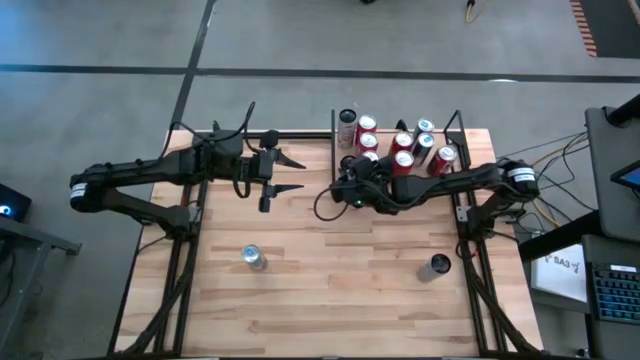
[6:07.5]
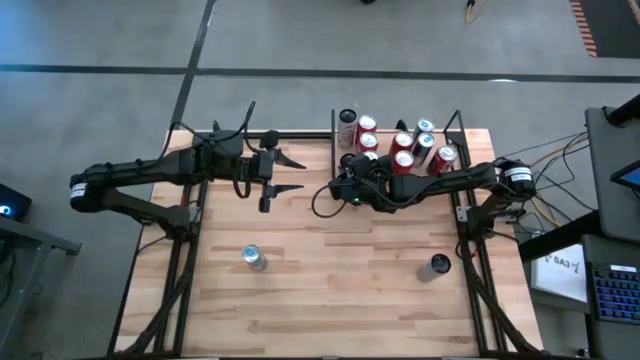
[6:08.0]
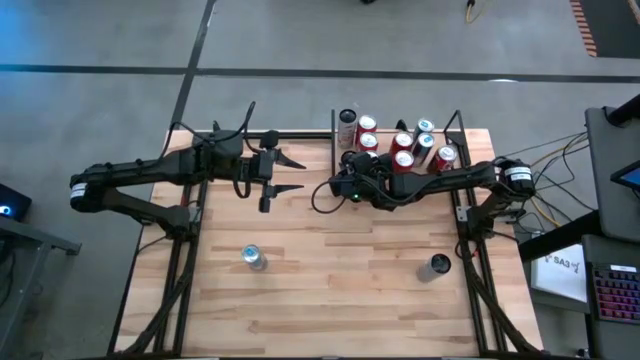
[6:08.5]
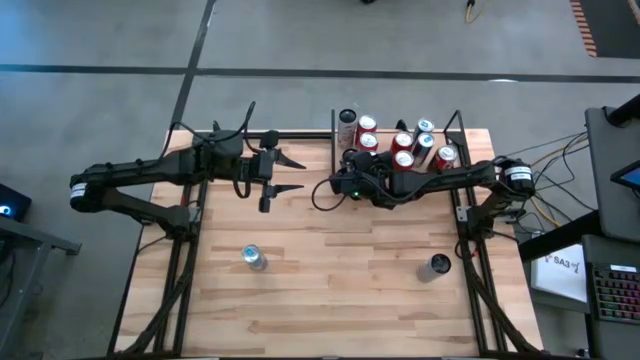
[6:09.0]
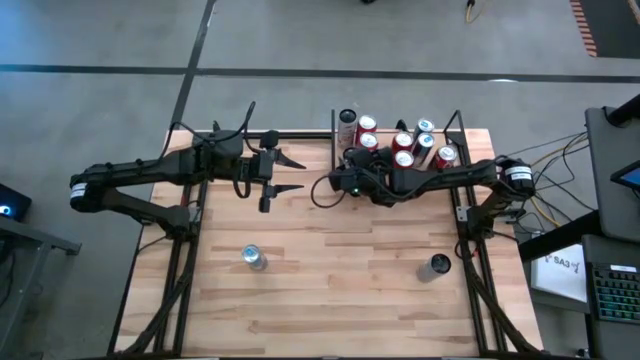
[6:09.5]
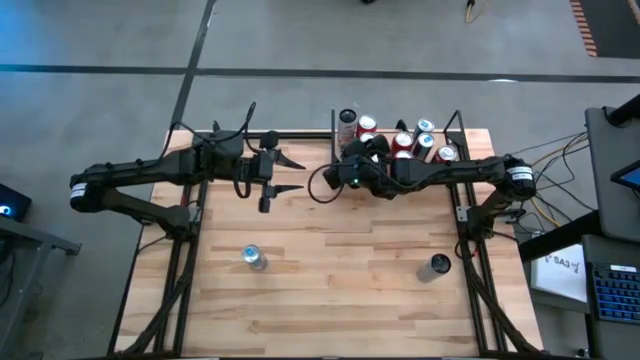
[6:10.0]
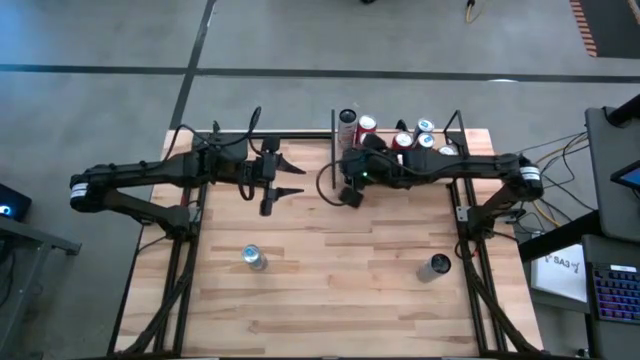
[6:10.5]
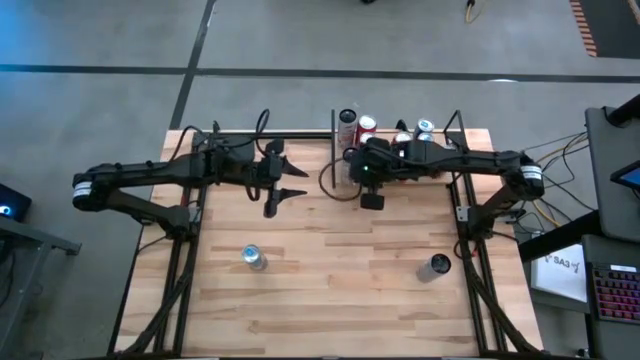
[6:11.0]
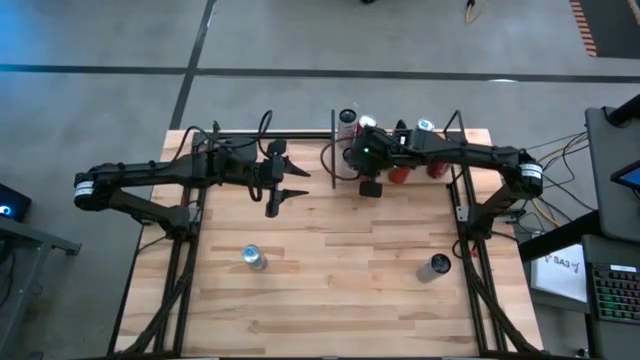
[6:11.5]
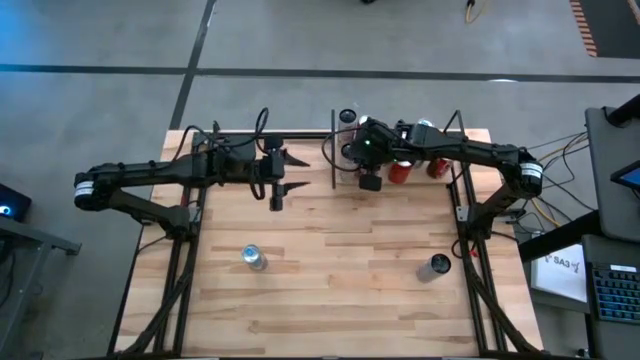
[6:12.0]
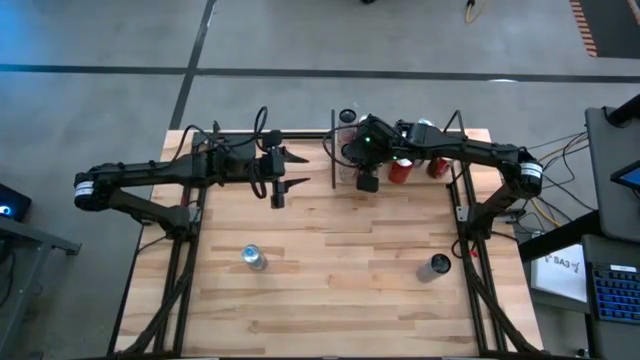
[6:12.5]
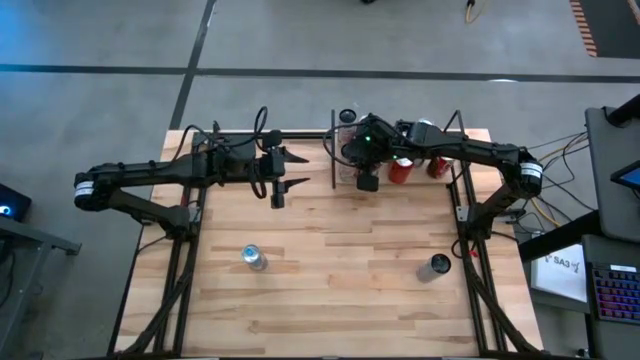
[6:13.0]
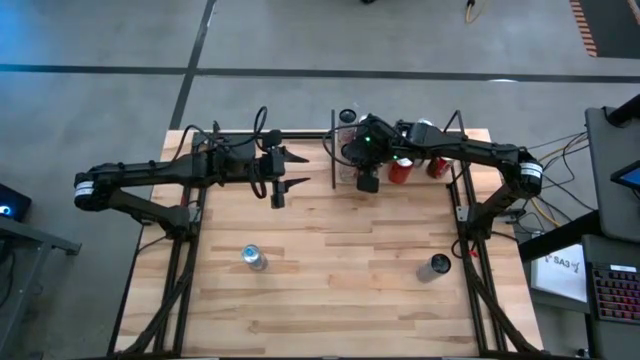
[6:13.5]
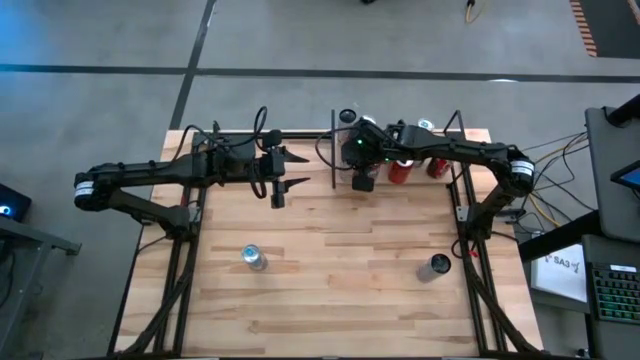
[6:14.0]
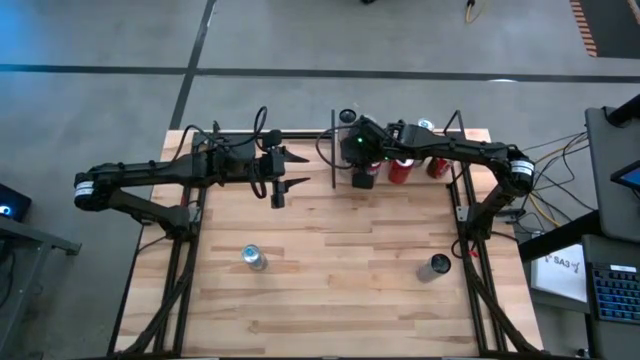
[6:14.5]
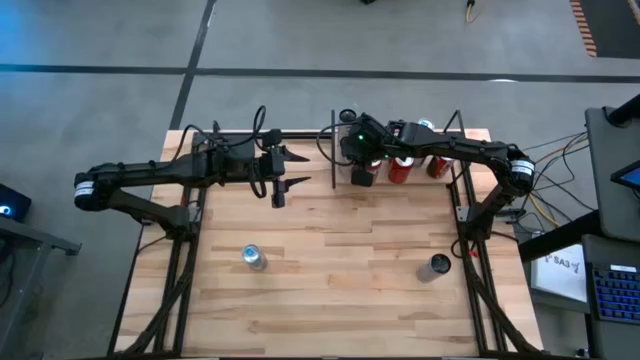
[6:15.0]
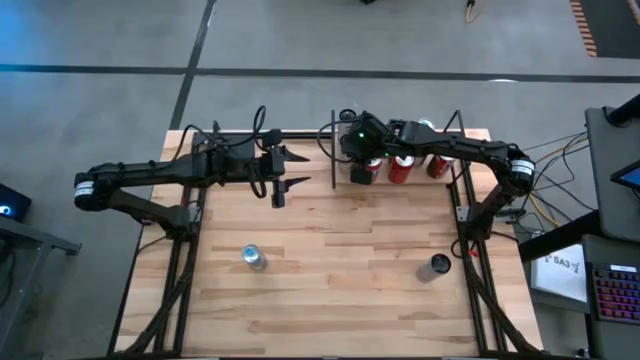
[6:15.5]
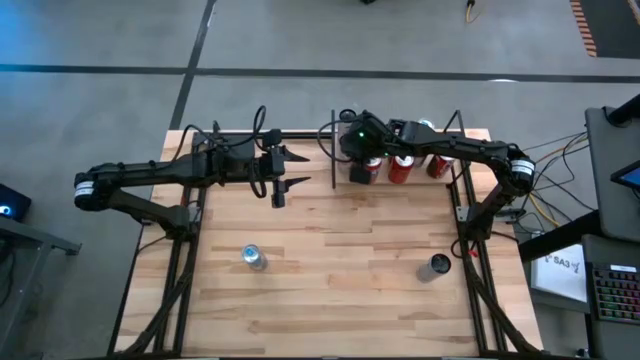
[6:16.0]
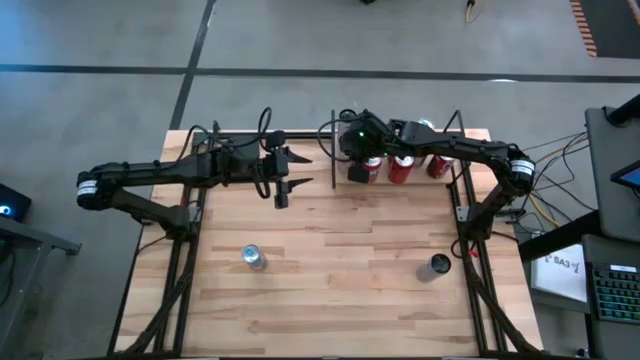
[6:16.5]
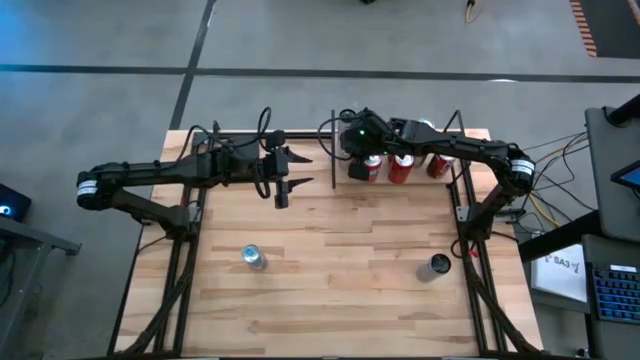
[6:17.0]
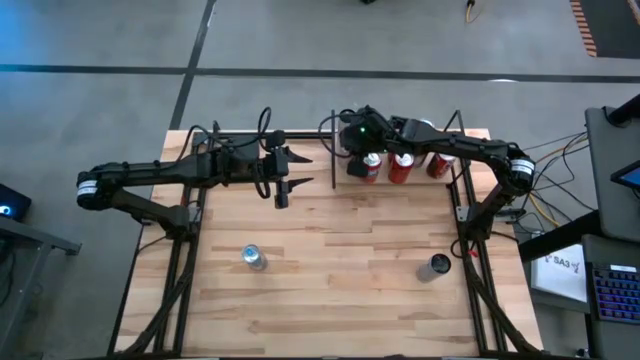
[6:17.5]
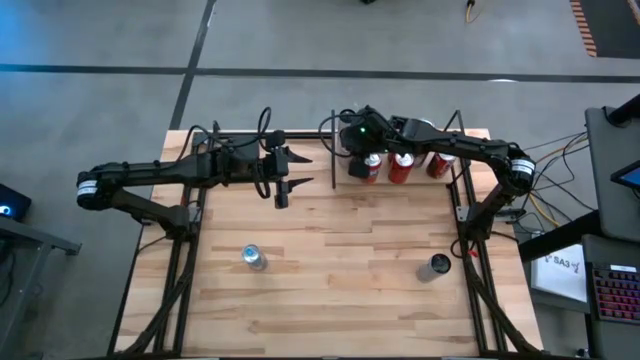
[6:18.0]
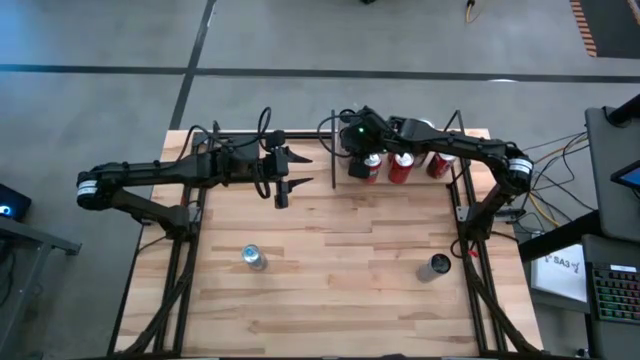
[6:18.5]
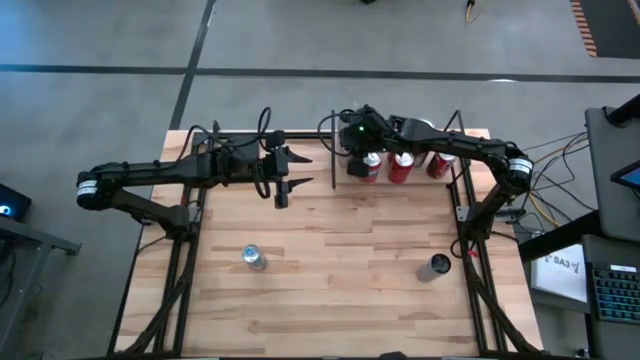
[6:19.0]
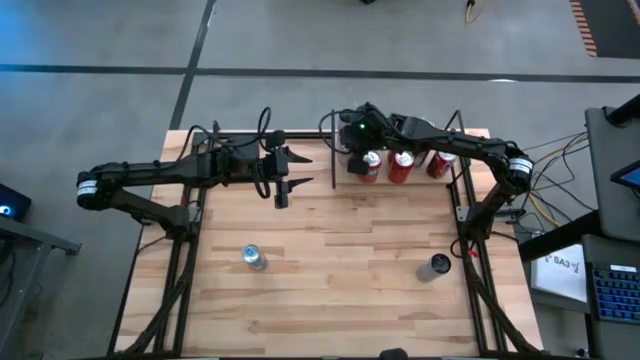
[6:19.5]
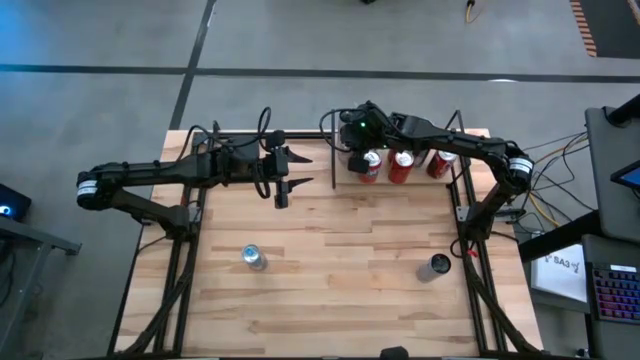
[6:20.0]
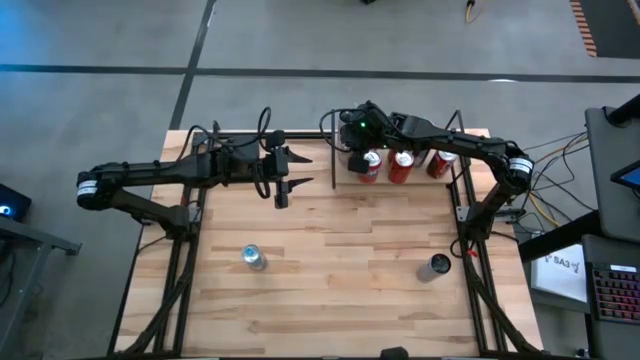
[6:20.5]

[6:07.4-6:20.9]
Task: Place canned beverage on shelf
Put the left white soda can on the shelf aligned with the other white soda can

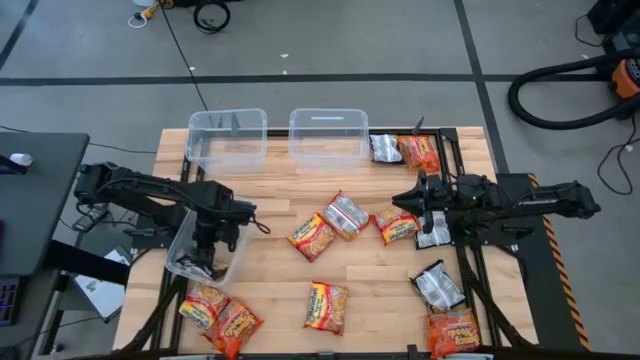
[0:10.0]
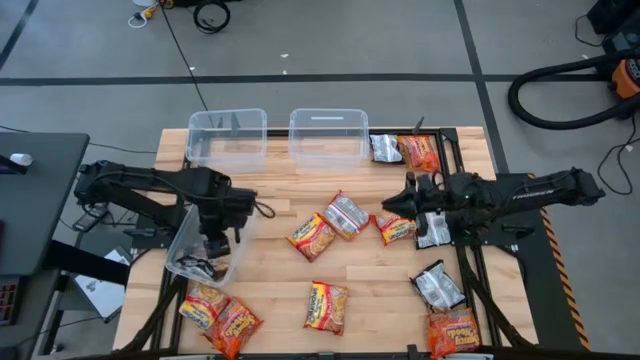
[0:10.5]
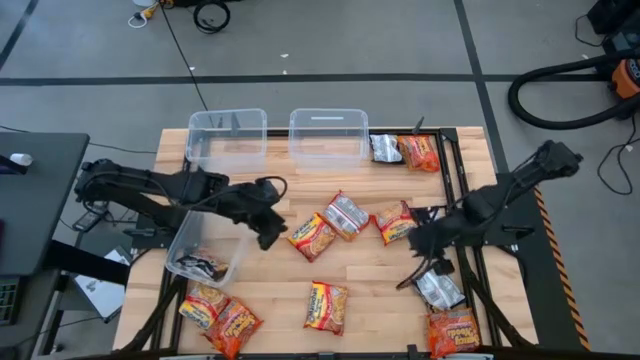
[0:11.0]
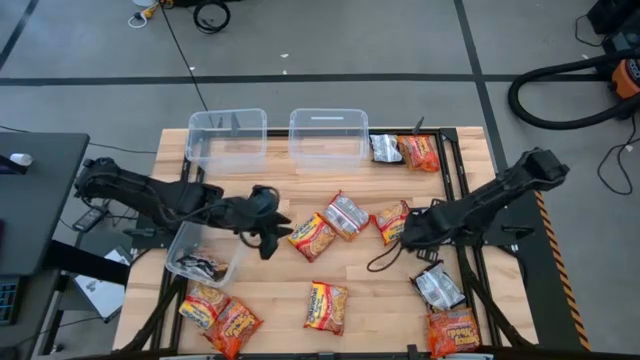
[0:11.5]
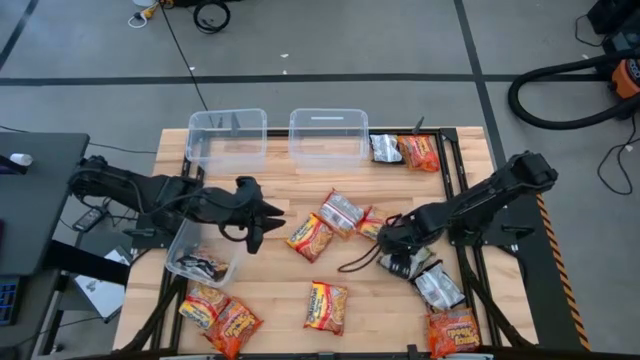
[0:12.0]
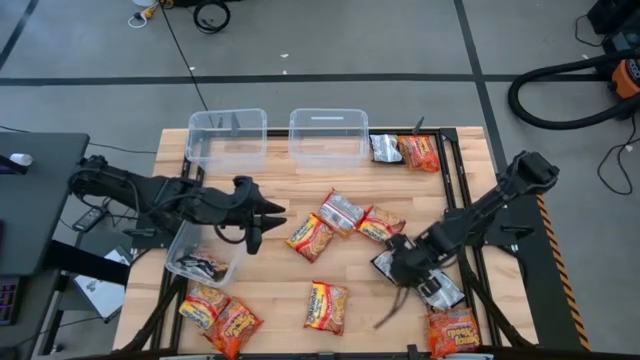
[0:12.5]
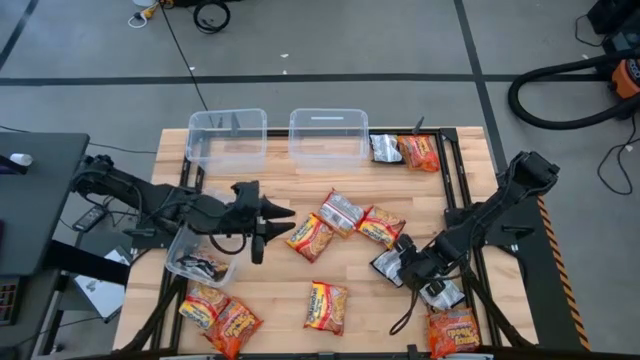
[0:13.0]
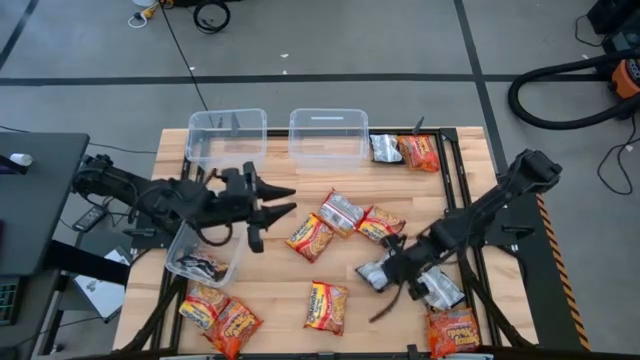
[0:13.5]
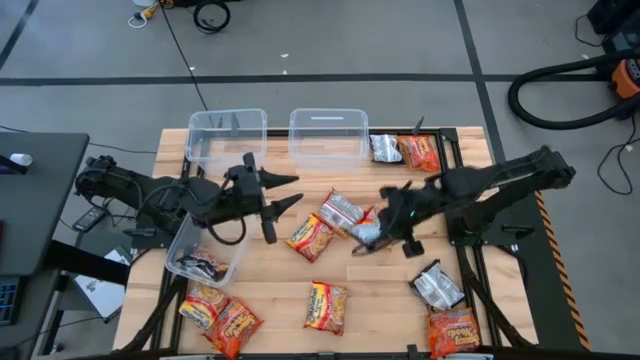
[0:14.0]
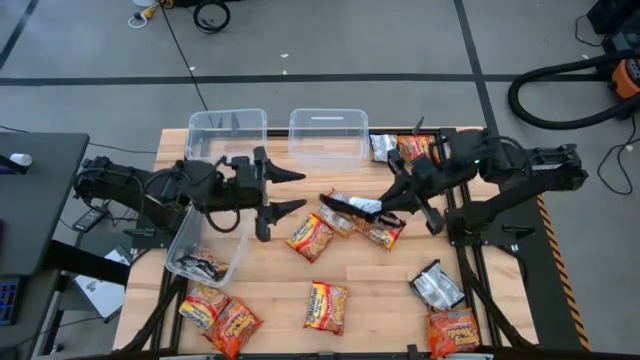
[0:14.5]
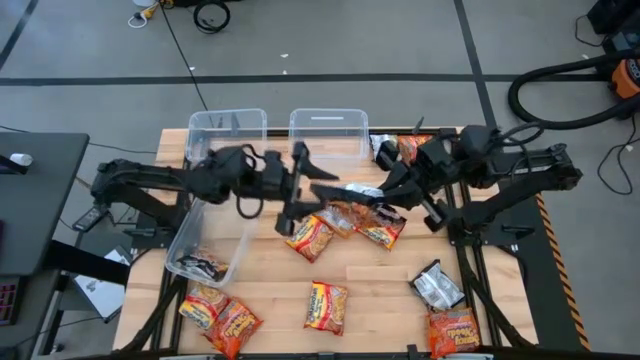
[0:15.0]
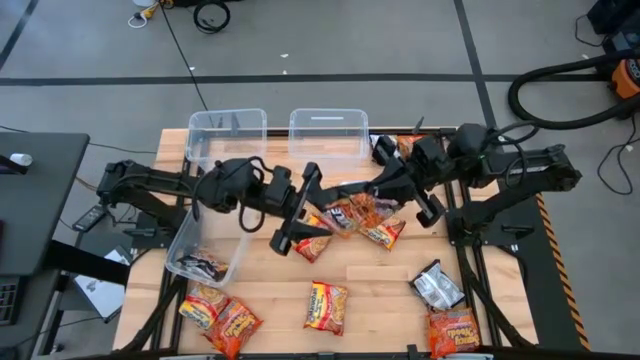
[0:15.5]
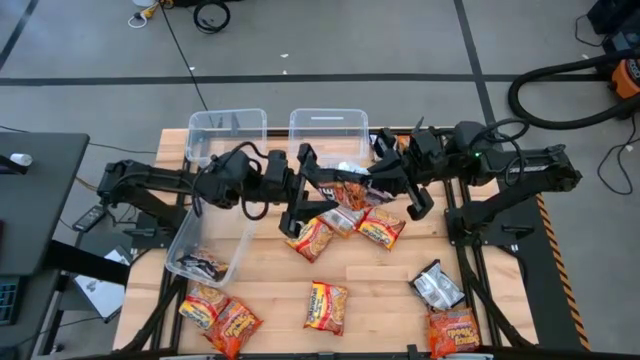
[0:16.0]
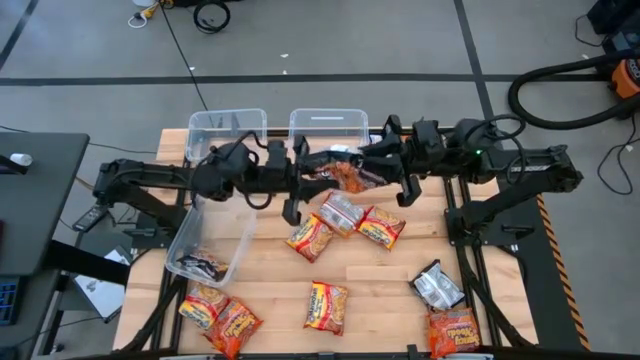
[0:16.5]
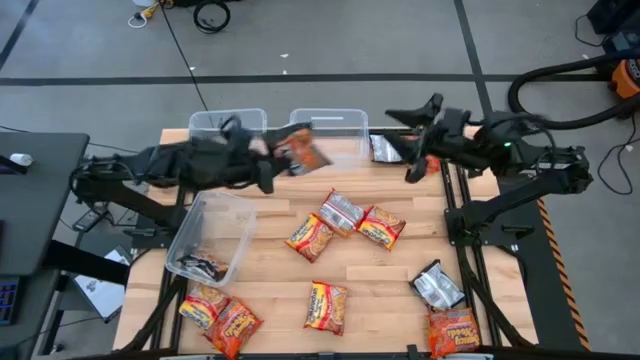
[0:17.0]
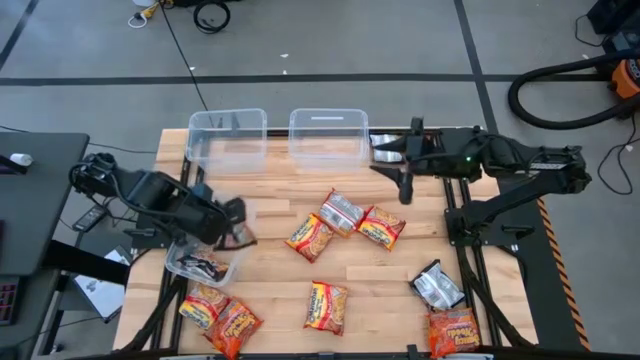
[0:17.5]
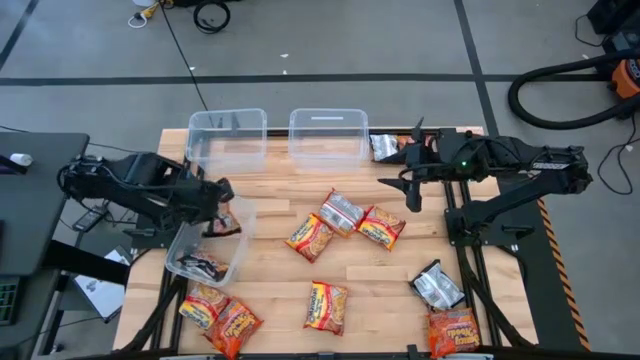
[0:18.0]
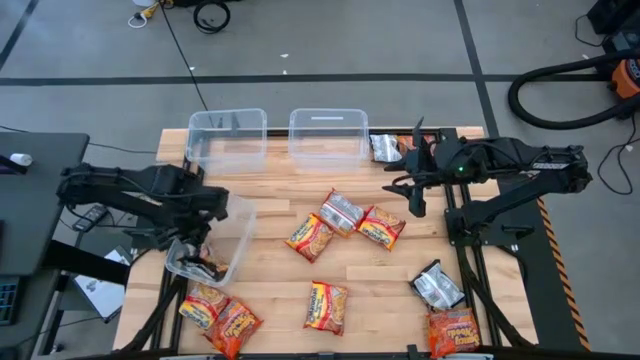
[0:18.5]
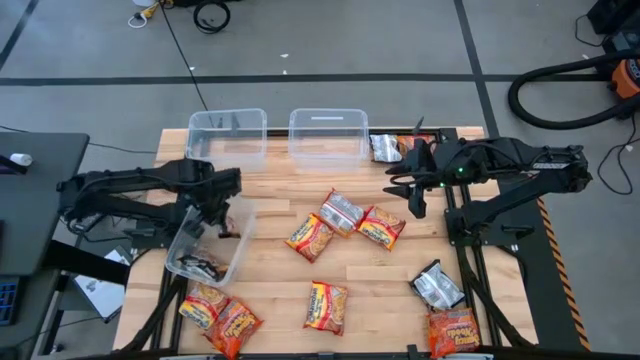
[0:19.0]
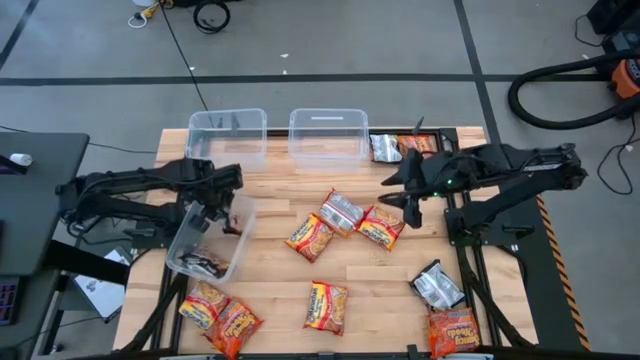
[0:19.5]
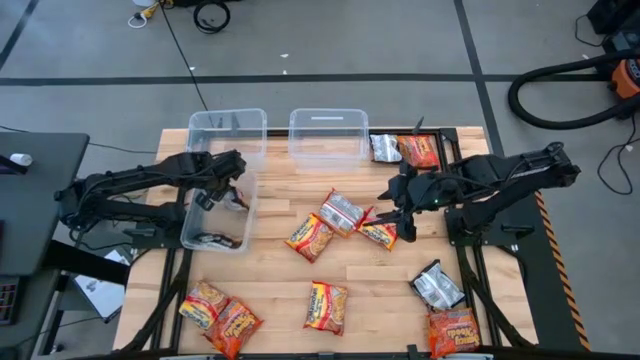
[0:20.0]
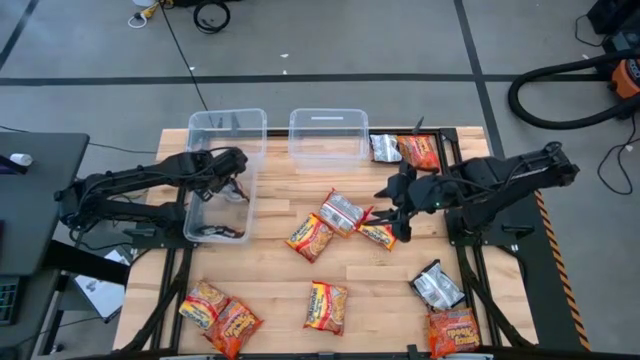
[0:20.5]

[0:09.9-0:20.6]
Task: Sort Maruchan noodles
Put the middle right black noodle pack into the bottom transparent bin
